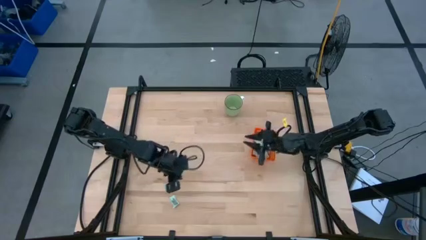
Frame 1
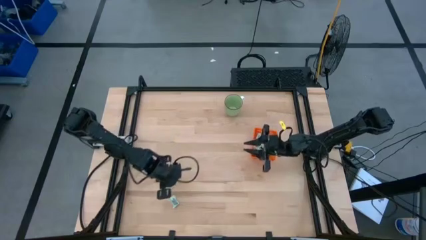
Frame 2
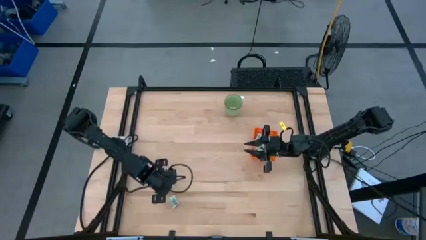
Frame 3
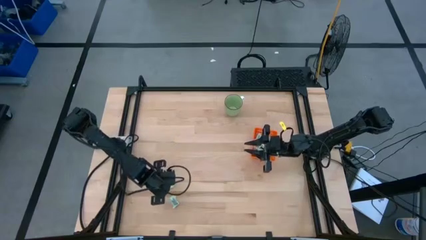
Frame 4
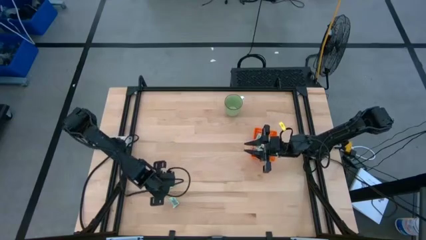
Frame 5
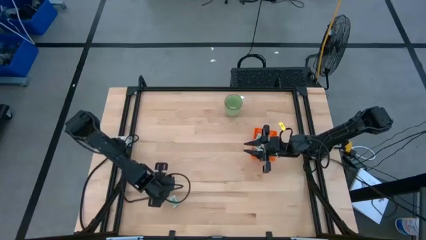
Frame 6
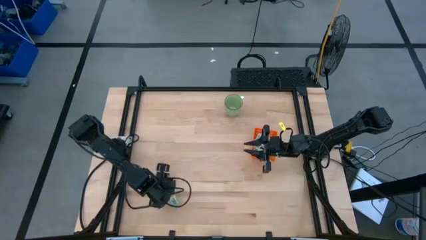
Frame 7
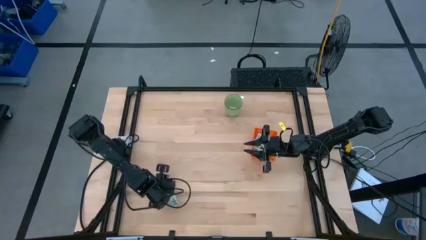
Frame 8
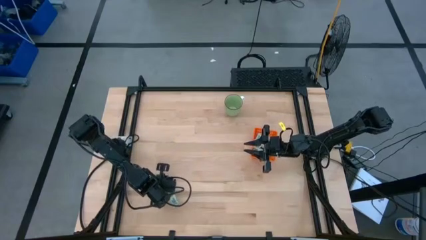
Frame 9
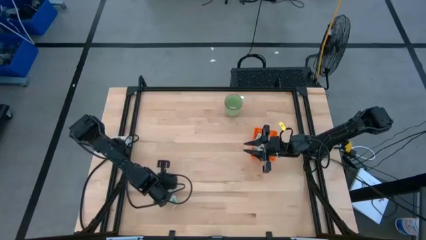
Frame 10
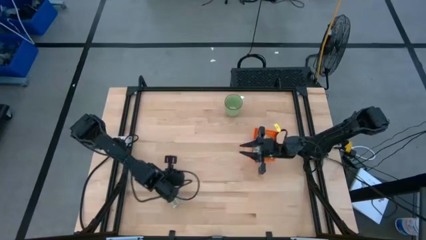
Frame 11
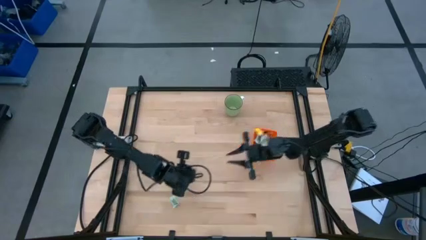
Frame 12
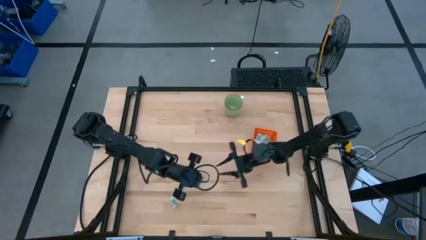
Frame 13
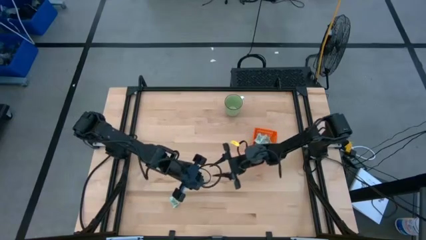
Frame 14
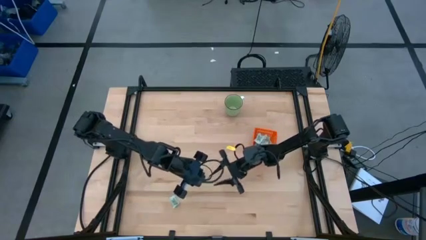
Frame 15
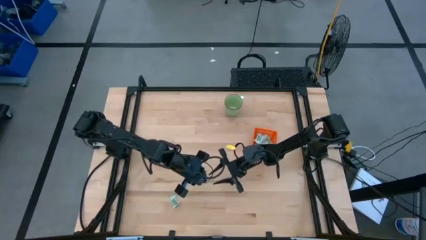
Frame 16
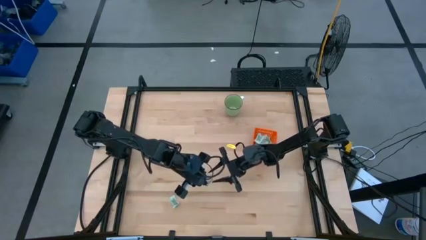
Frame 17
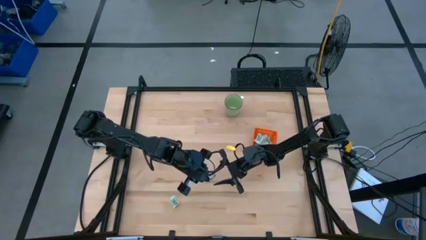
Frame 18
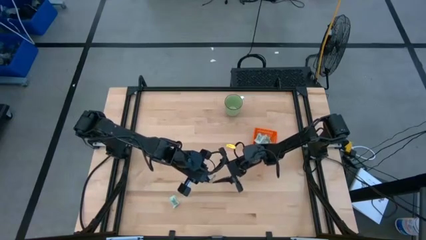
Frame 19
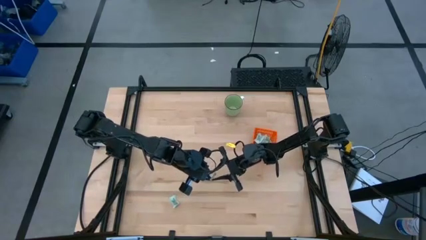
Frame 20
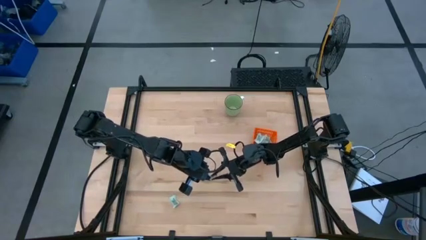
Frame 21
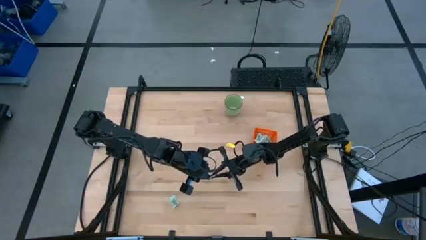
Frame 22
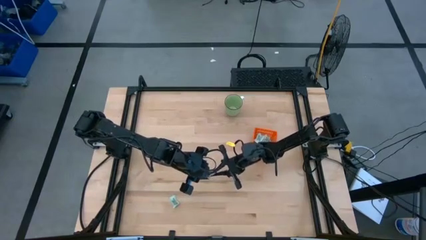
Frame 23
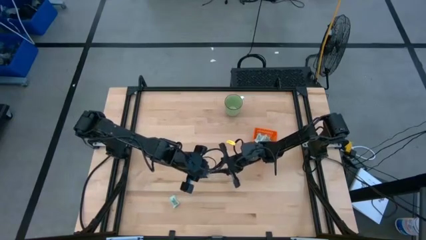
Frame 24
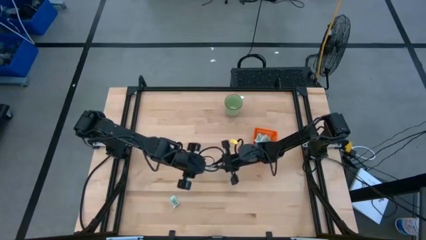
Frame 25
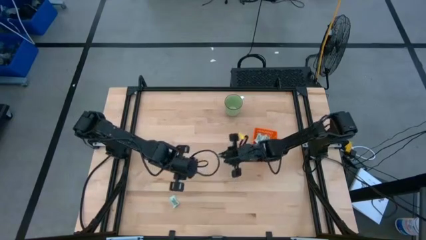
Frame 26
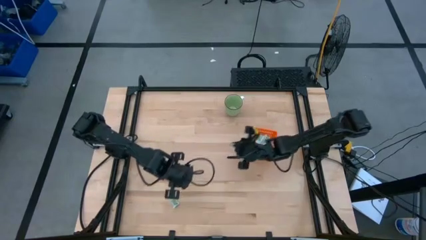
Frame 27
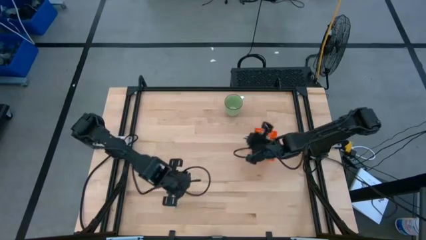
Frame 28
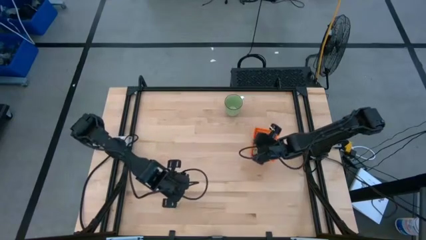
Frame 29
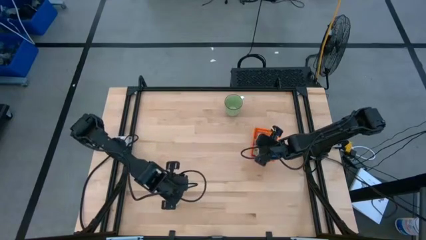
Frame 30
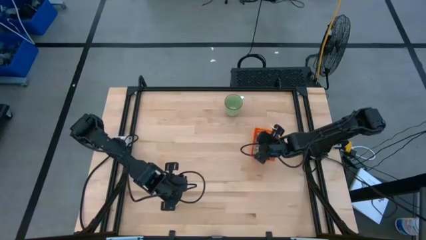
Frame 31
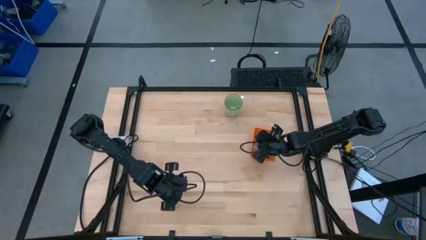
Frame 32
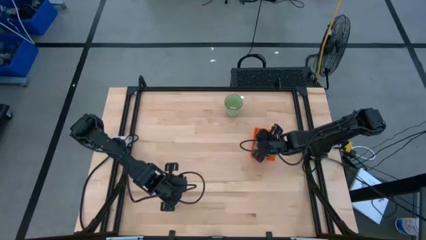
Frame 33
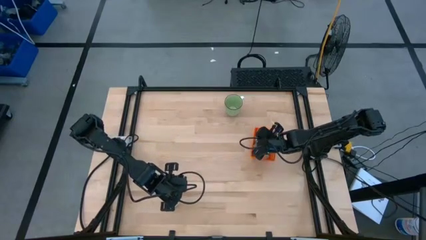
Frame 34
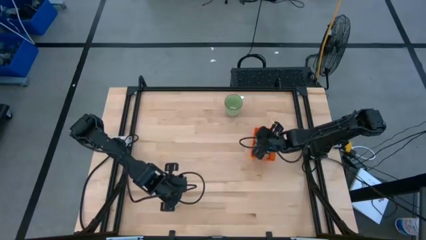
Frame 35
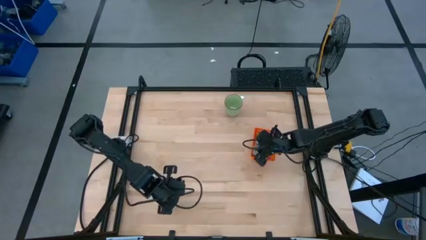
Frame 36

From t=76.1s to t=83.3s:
Task: Pick and place Stevia / Truvia into bins
Put the light green packet into the orange basket

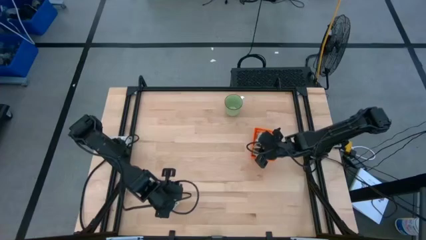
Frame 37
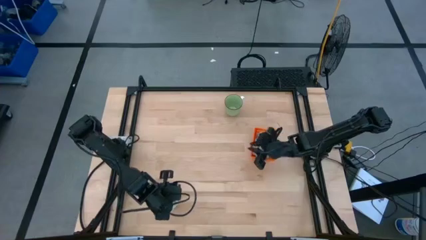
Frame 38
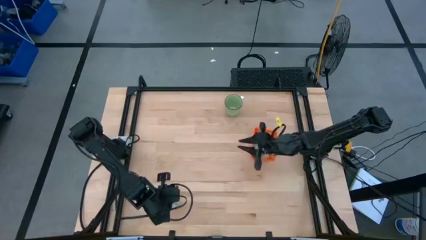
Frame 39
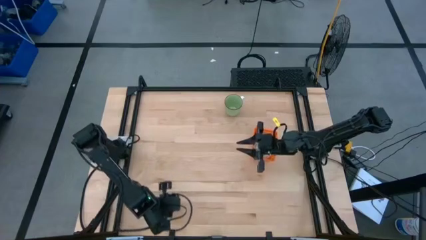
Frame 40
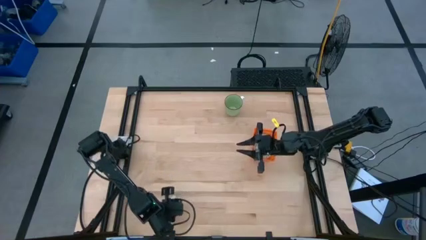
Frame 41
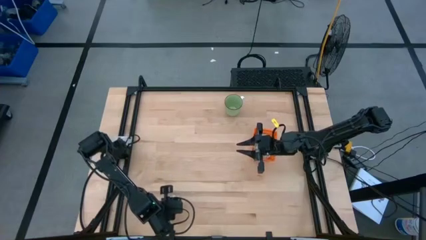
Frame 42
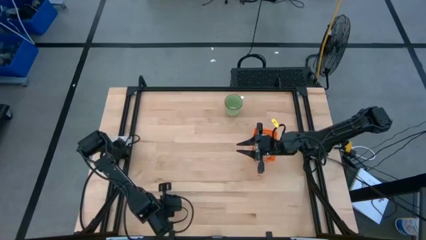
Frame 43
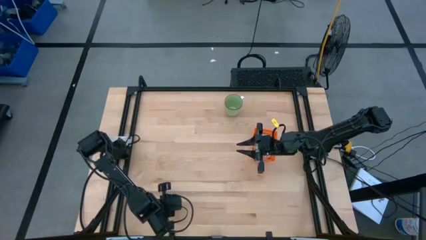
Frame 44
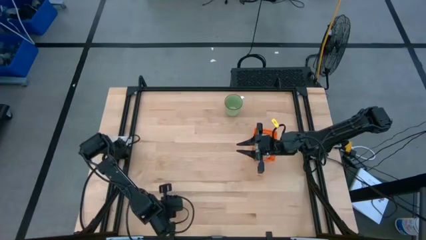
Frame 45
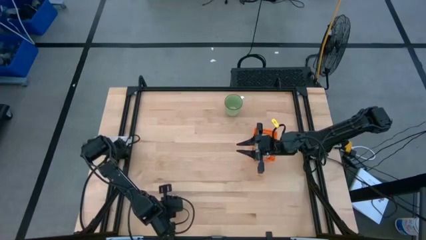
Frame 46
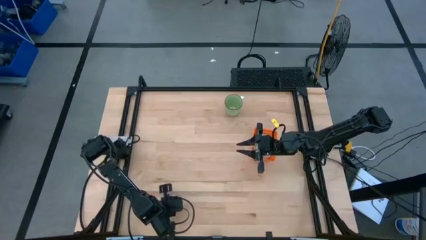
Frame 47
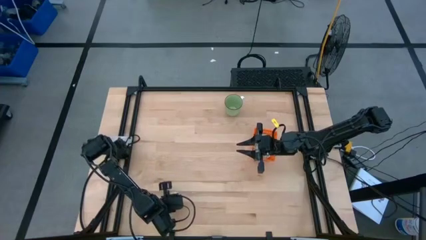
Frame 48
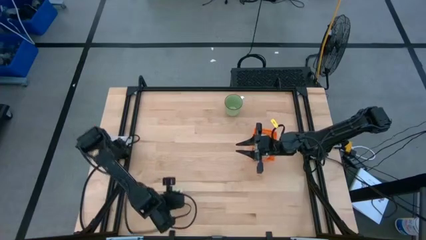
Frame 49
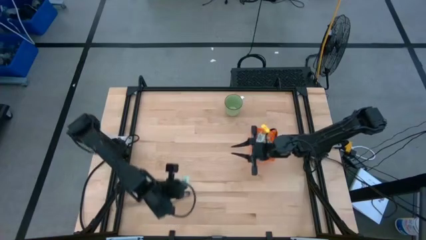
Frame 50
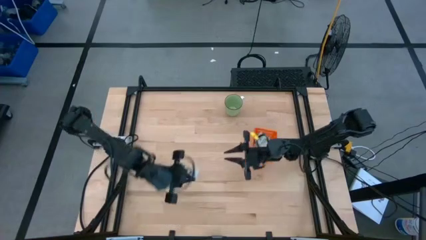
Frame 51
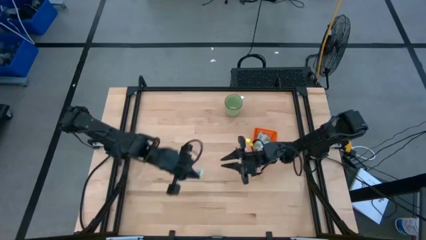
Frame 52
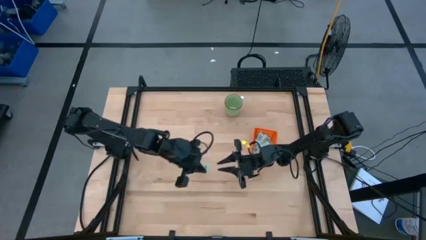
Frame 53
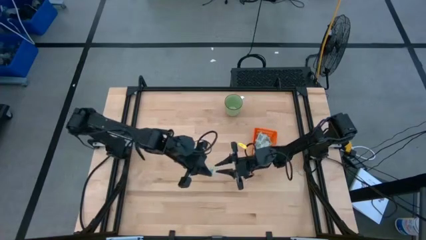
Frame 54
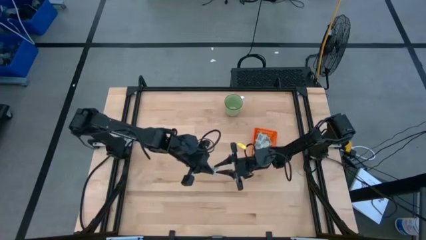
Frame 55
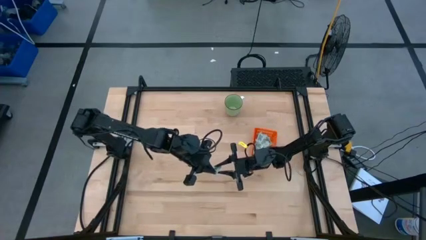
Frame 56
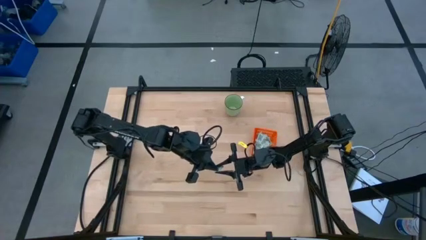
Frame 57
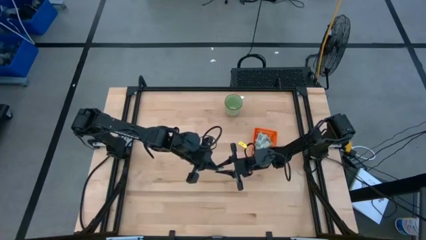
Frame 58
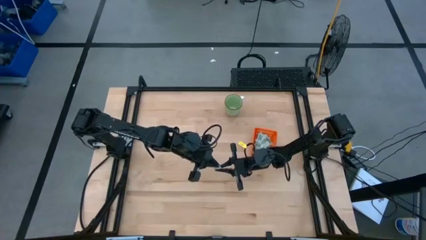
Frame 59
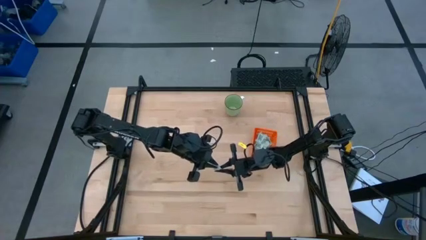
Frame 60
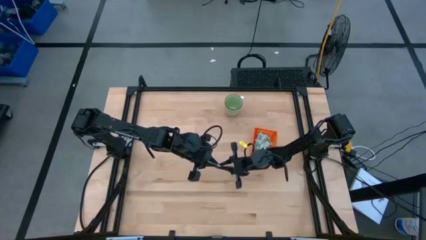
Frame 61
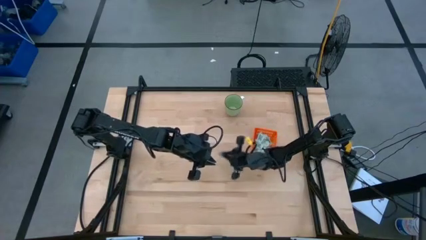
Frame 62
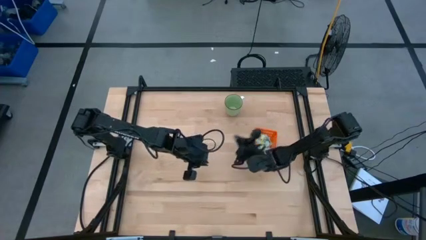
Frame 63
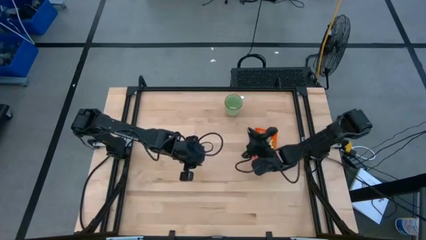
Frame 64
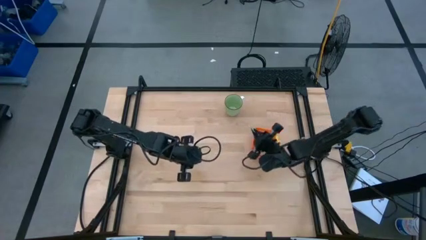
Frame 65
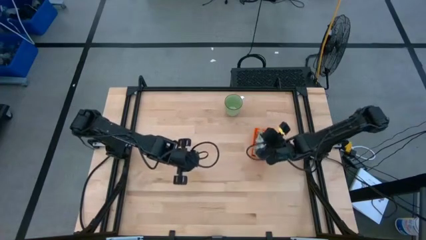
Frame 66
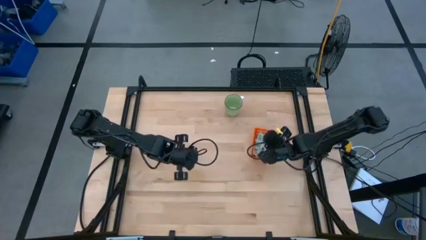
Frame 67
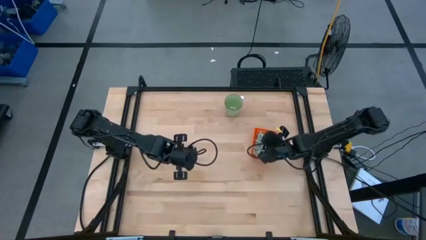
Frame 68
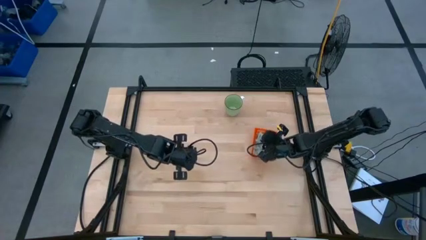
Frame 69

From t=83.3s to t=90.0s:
Put the light green packet into the orange basket

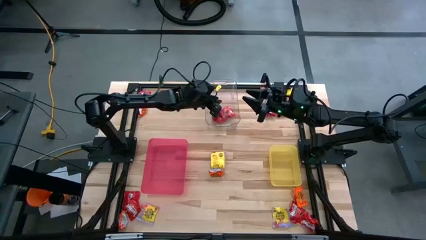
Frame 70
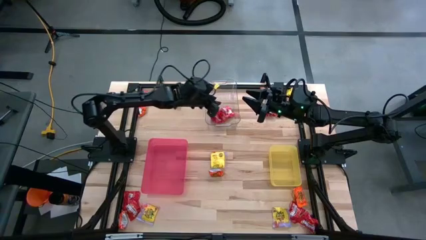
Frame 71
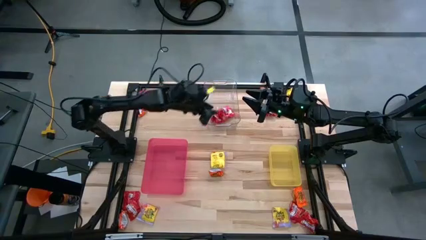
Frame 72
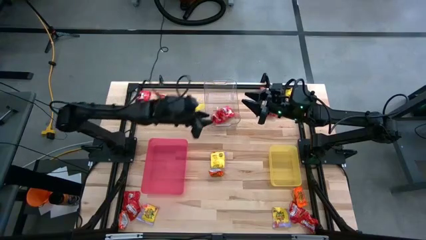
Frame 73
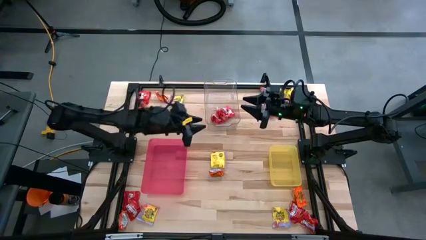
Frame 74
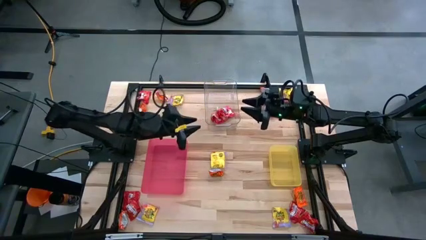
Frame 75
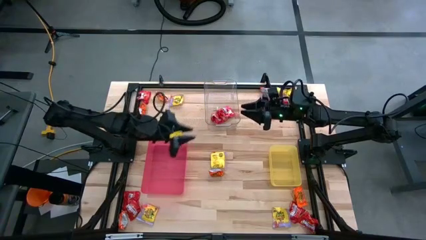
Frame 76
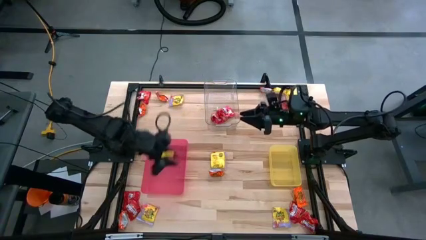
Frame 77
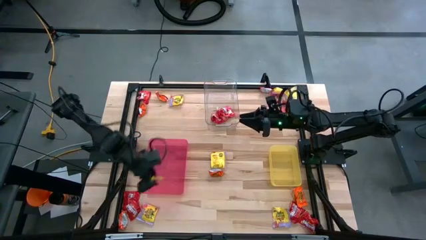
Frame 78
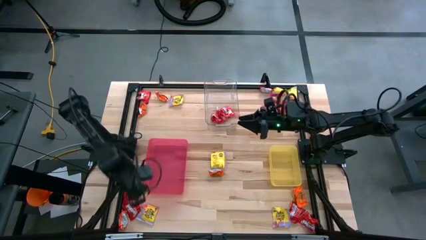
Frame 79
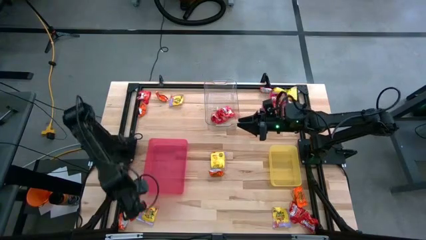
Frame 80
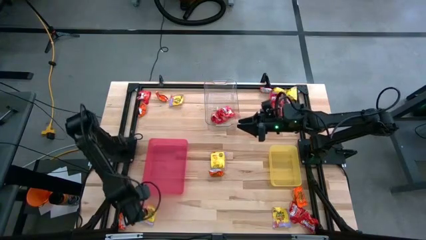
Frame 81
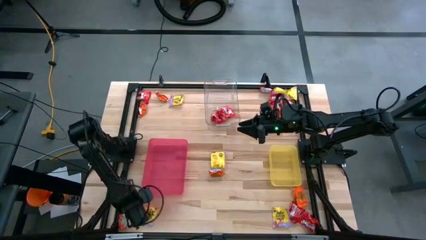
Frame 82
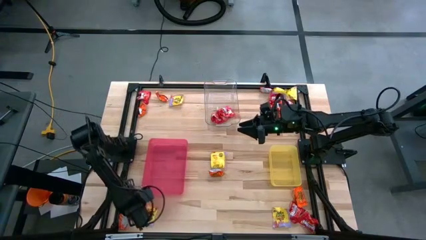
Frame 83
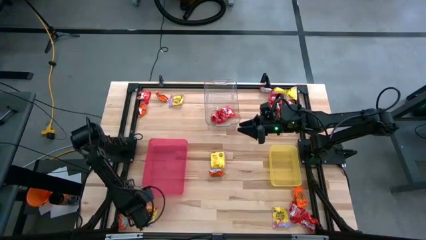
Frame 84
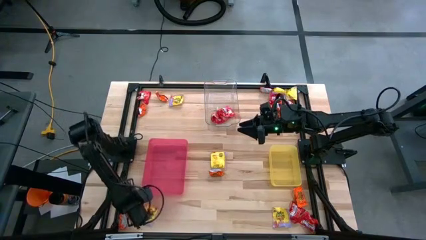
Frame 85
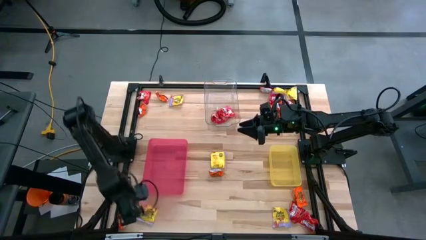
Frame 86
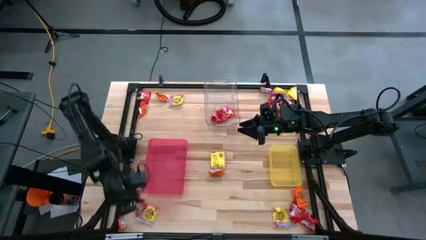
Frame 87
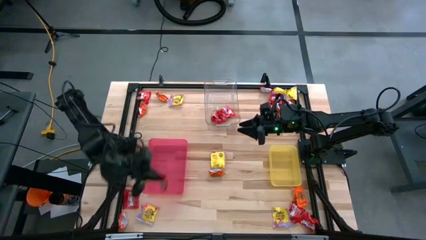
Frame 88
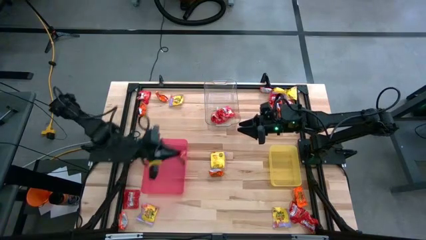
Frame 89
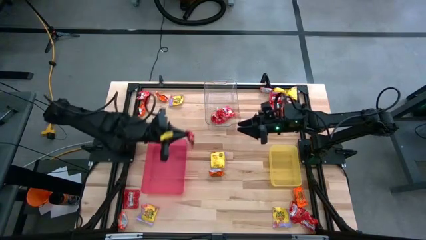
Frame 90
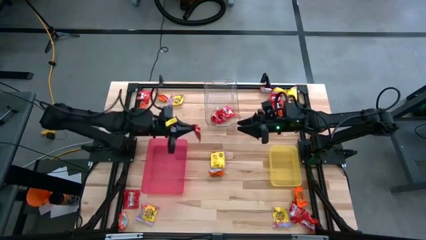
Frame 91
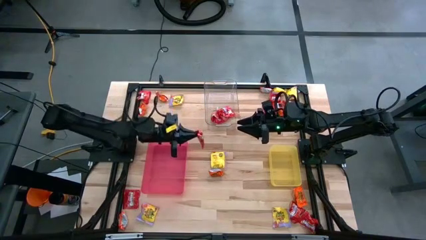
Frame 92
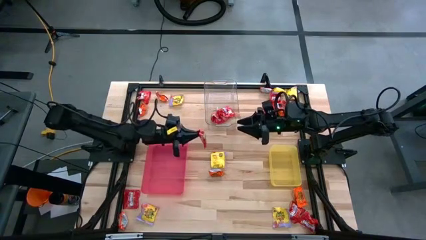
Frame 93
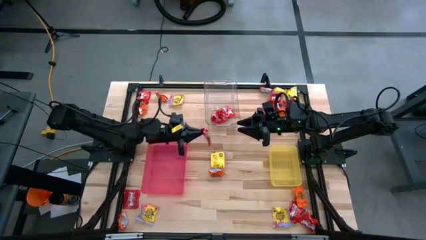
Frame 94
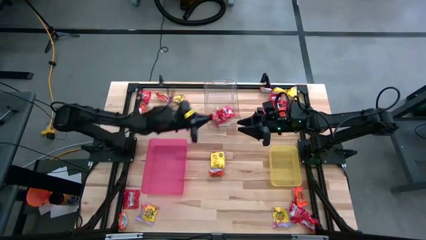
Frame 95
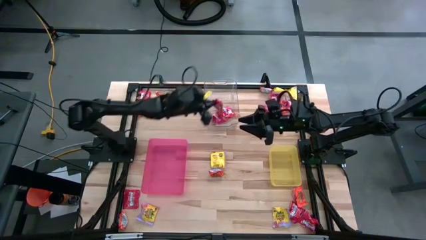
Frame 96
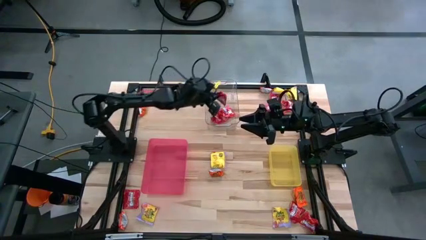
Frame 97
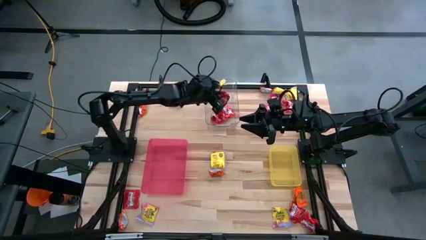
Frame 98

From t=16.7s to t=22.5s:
Task: Sort candy
Put the red candy into the transparent bin
